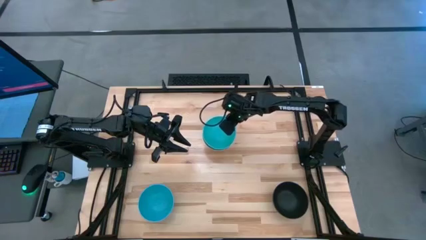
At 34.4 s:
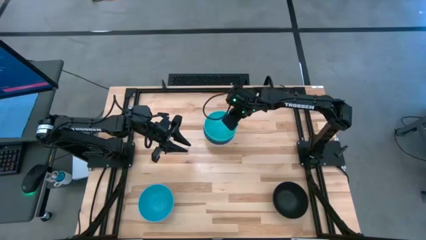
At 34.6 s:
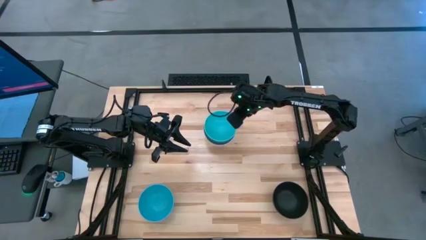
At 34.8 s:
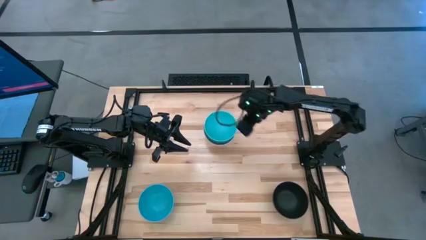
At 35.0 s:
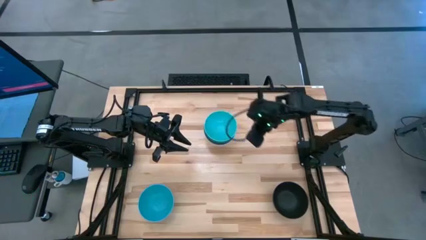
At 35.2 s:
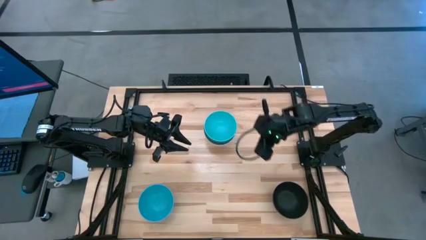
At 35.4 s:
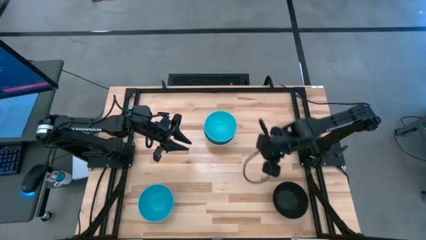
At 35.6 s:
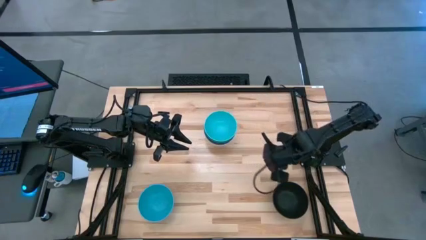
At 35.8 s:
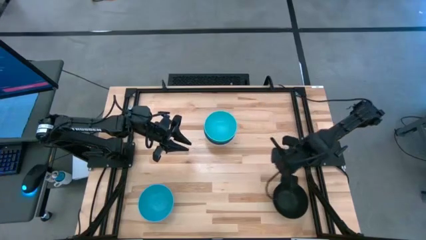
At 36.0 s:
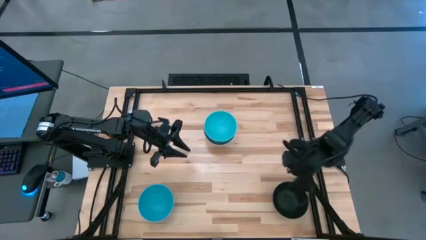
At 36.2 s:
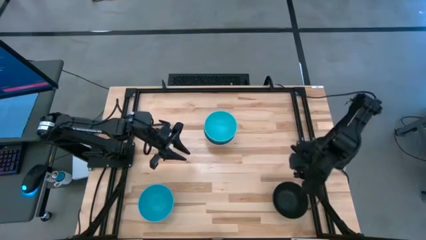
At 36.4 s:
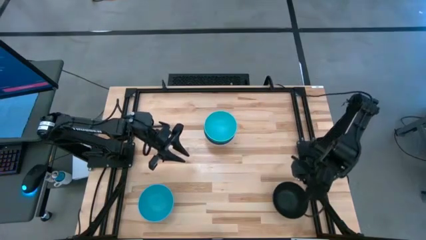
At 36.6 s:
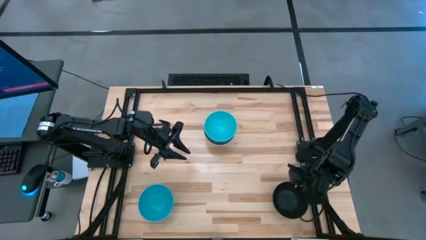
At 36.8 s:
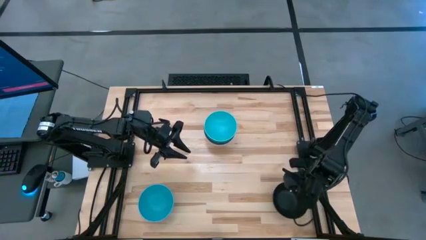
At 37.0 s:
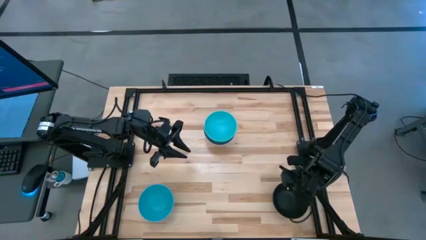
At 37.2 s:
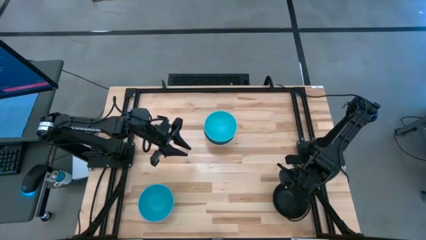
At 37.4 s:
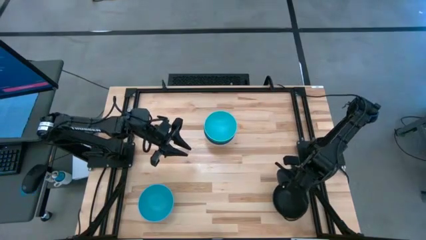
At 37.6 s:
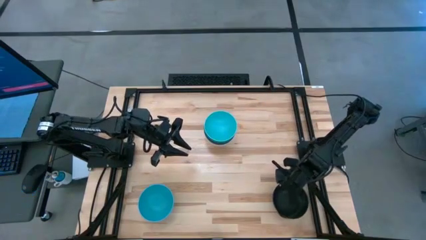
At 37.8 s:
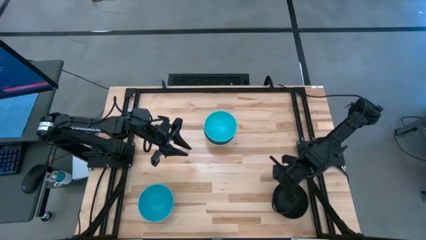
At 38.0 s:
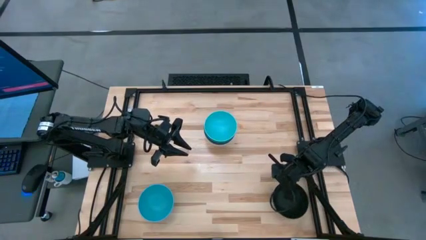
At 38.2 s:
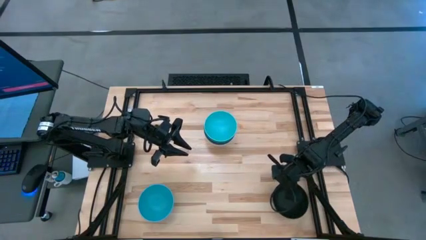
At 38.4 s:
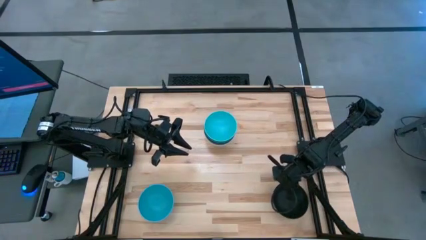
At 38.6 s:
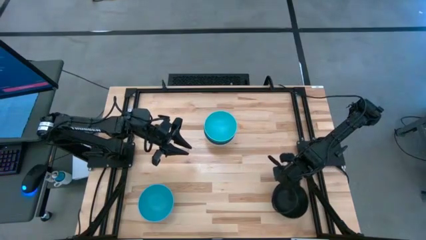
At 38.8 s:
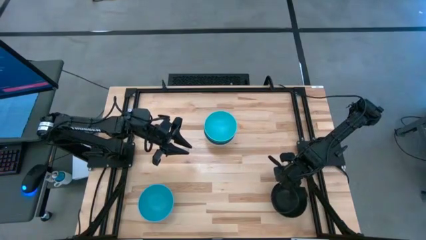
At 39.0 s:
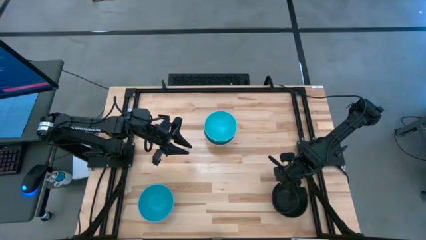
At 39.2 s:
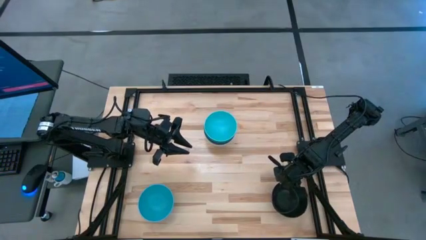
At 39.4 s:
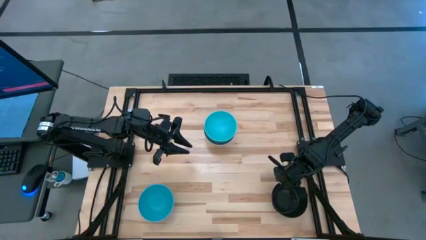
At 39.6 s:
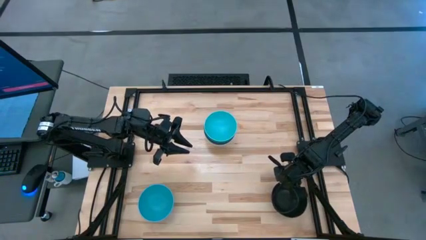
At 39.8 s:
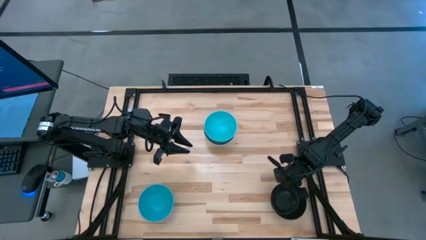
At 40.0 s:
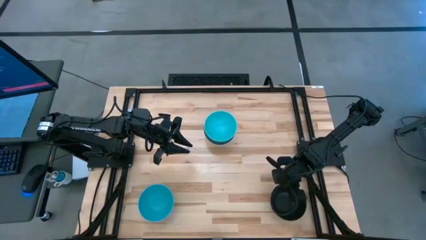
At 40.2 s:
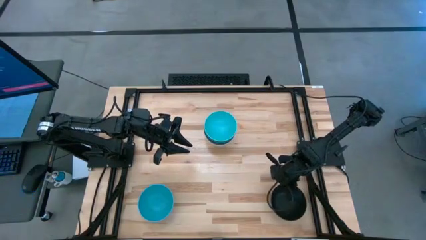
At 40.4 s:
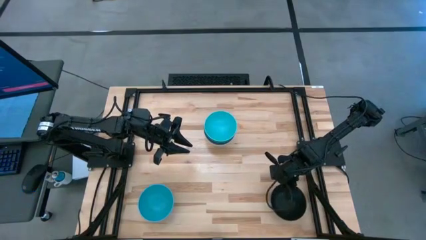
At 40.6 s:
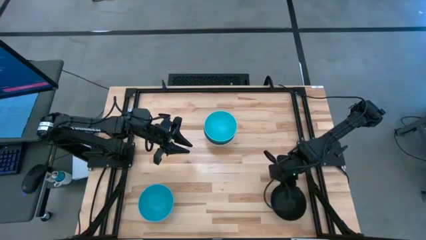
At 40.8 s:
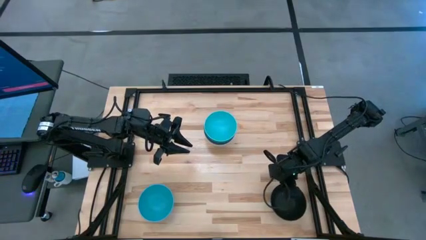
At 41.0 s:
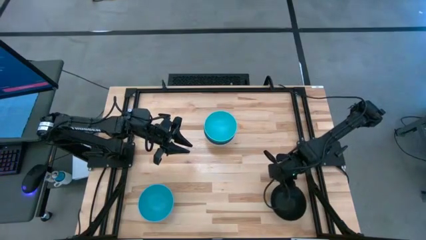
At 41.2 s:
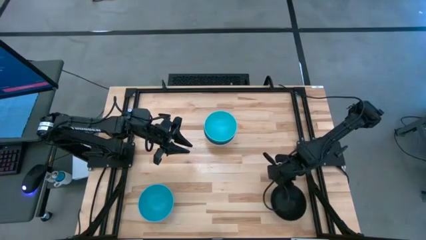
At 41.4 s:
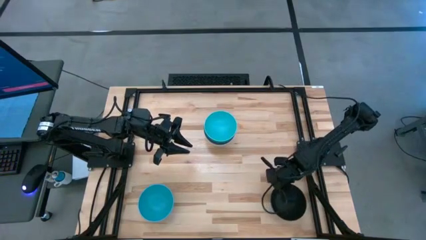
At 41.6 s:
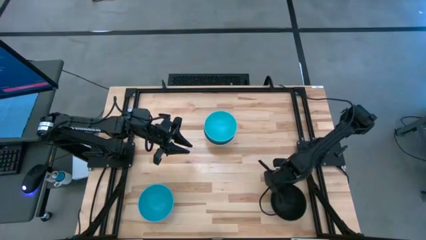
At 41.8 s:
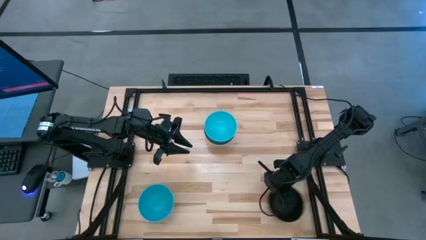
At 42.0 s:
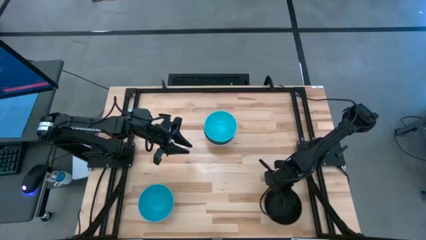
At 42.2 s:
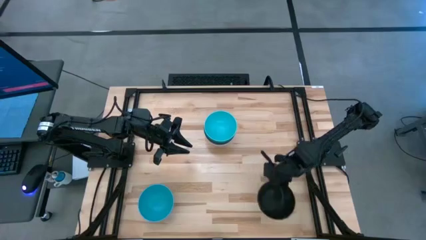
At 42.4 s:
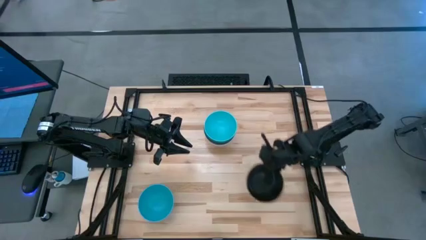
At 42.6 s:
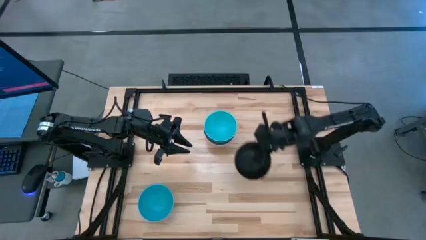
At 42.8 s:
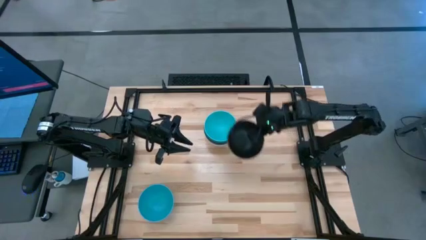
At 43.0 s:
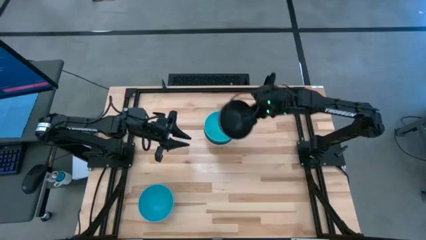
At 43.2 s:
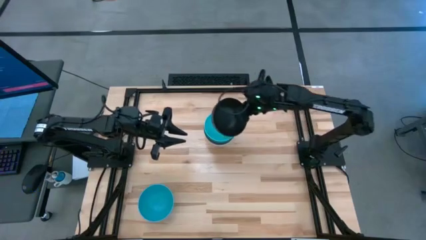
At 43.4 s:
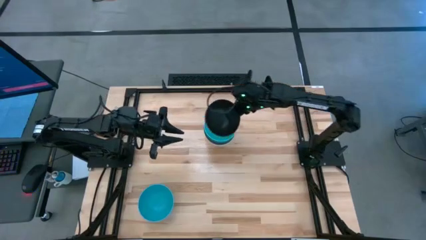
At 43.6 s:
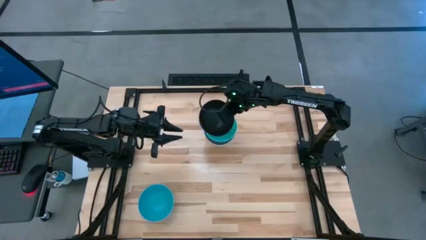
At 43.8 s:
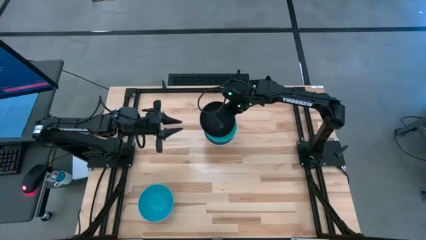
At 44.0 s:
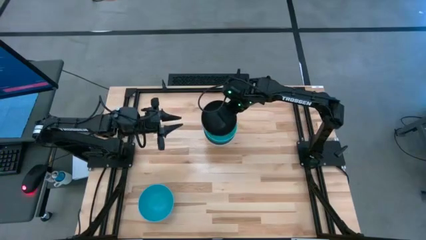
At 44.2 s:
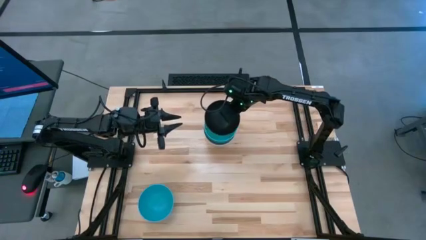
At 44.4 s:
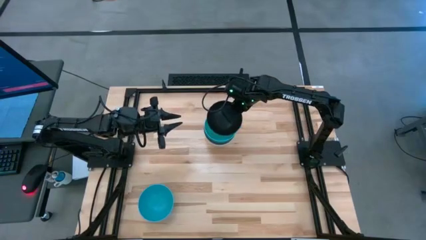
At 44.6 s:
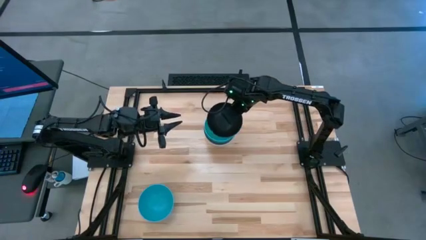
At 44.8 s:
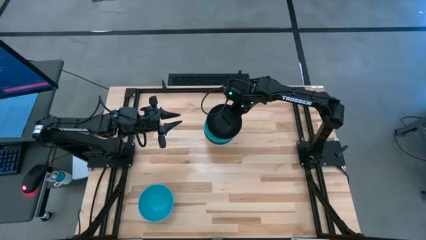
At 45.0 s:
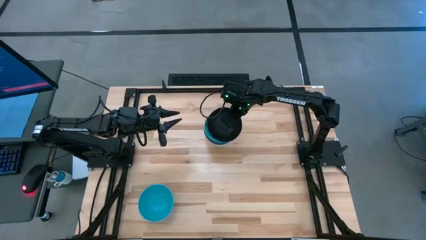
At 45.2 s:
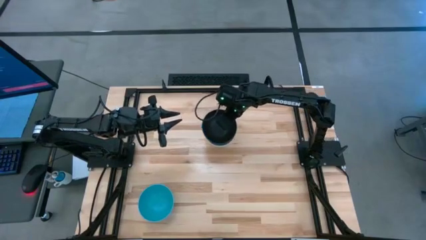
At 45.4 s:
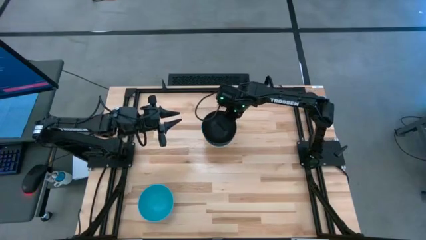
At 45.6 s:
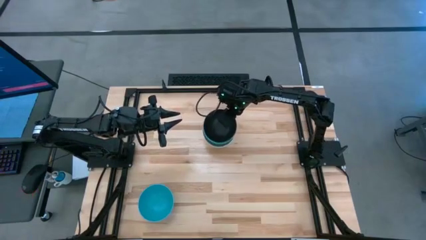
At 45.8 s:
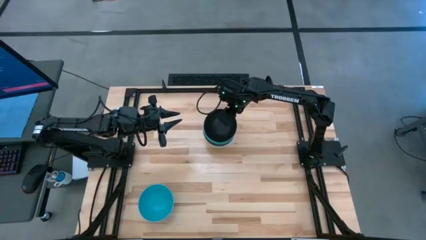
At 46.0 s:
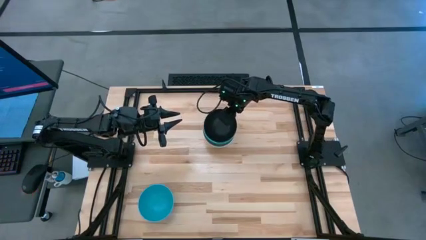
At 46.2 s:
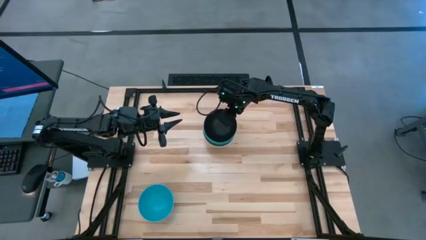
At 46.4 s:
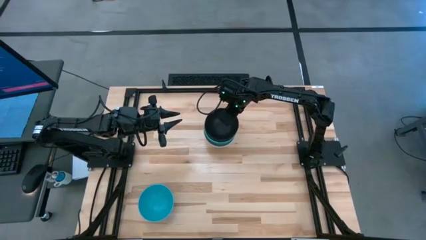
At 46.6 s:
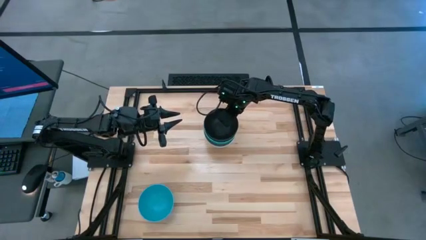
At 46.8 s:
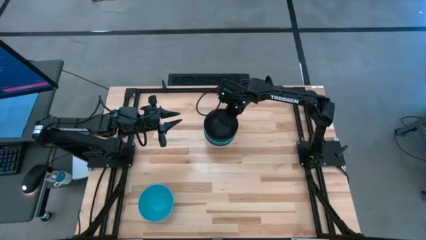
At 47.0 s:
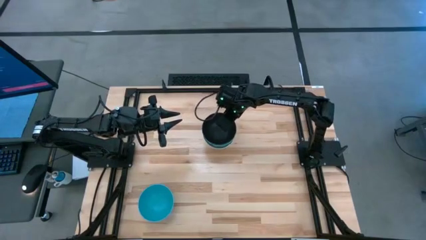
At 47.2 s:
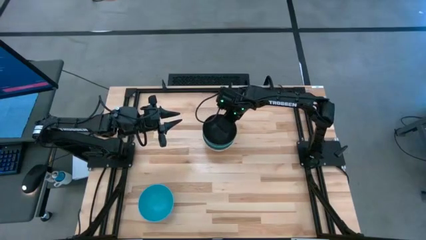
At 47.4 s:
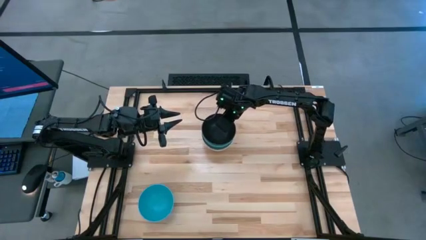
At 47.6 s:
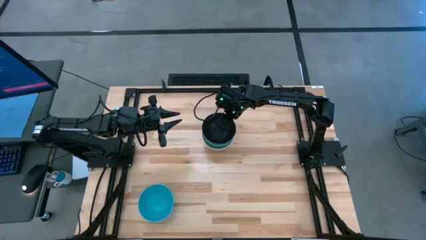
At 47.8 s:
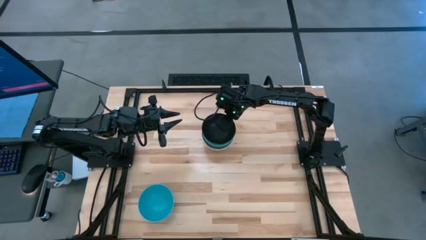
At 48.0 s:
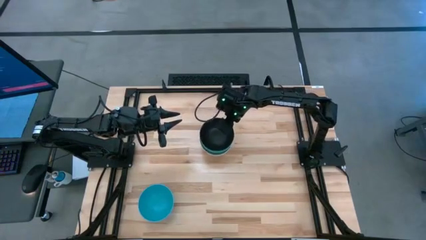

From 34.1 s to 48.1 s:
Task: Nest bowls inside each other
Stack the black bowl on the blue bowl

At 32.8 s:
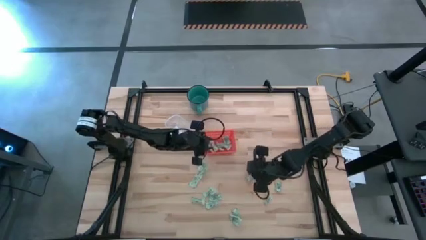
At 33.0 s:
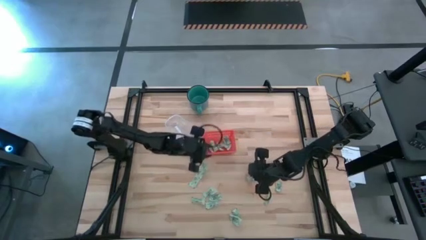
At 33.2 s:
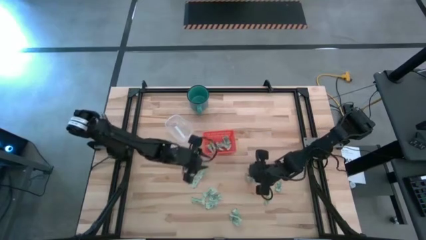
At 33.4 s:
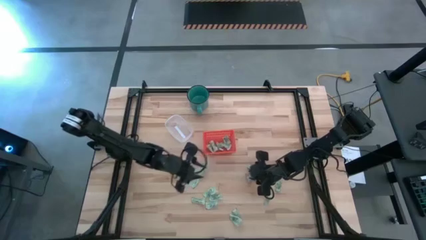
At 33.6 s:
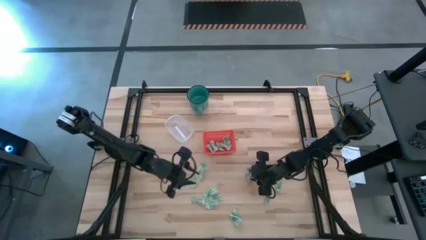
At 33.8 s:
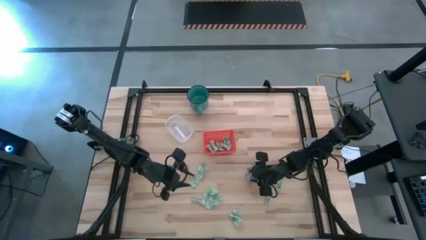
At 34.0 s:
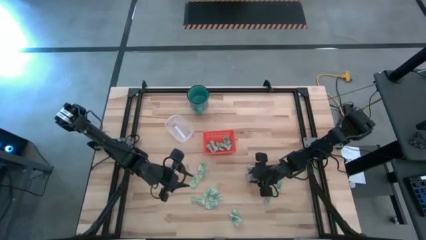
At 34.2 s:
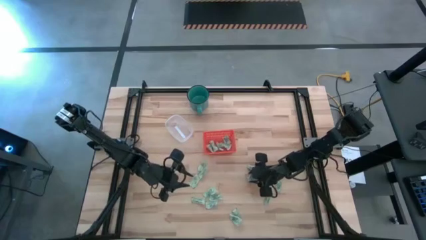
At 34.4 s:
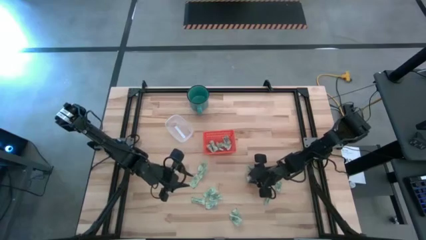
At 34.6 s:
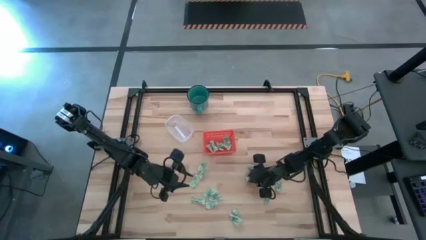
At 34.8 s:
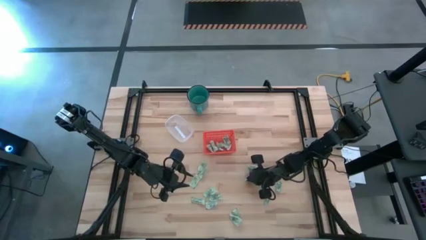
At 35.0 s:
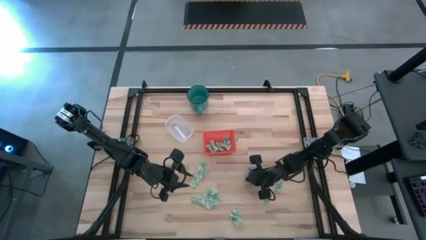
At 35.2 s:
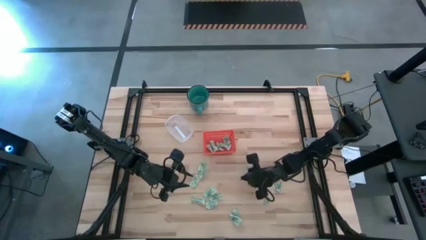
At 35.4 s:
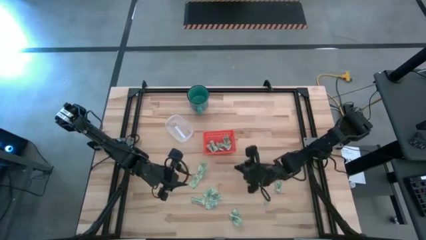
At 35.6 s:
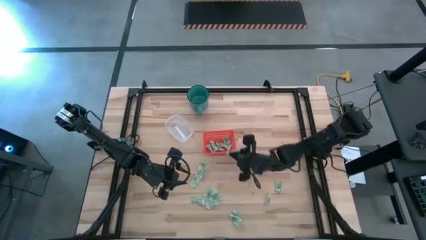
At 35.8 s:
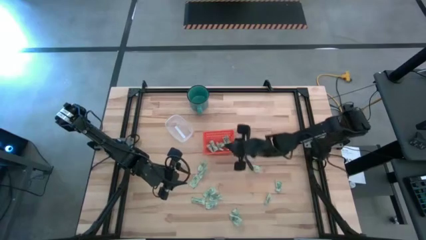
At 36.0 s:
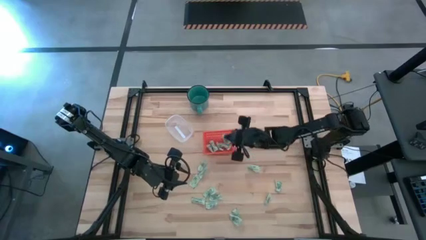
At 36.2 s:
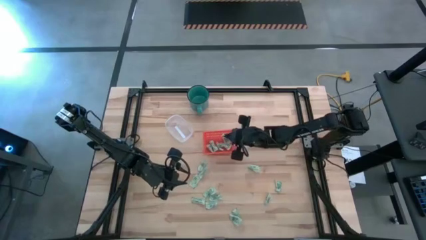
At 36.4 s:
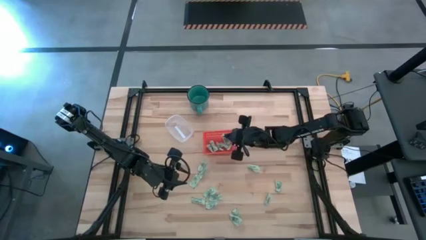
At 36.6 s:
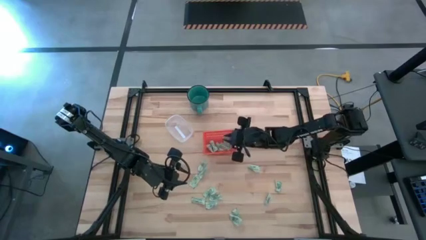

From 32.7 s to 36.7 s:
Task: Pick and place items into bin
Put the stevia packet into the orange bin
